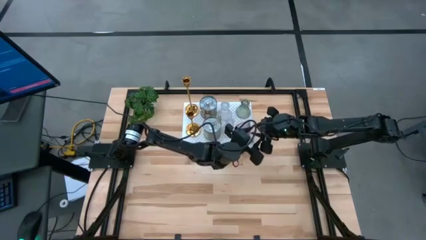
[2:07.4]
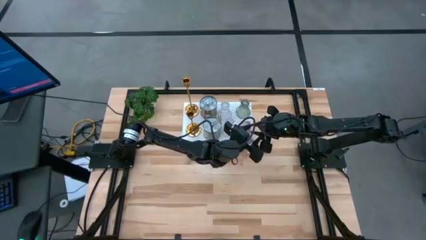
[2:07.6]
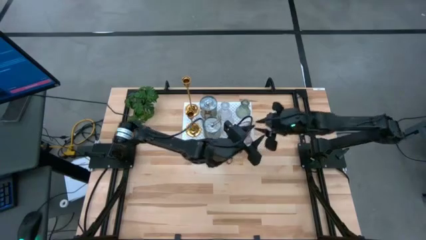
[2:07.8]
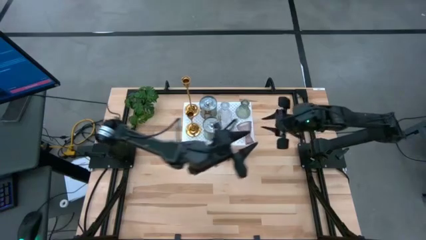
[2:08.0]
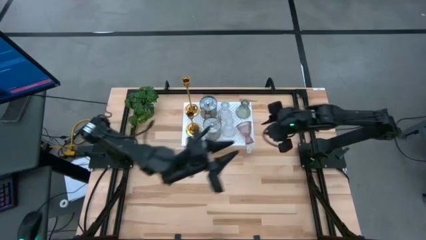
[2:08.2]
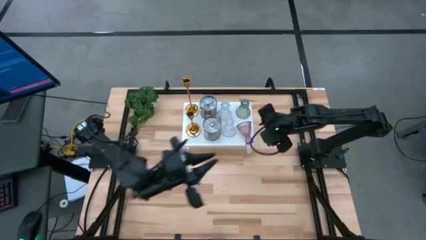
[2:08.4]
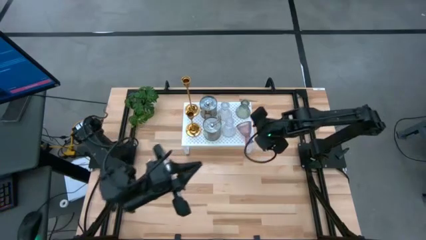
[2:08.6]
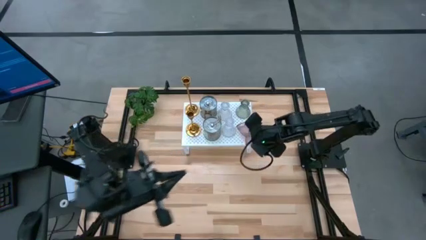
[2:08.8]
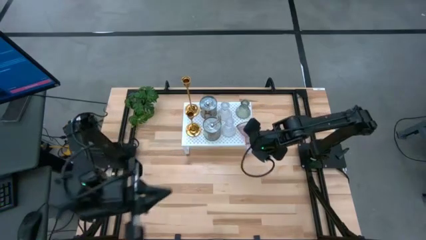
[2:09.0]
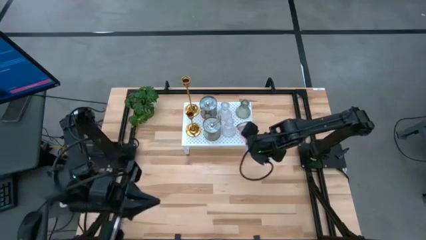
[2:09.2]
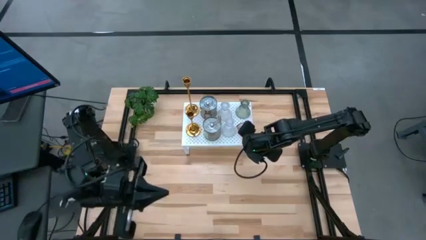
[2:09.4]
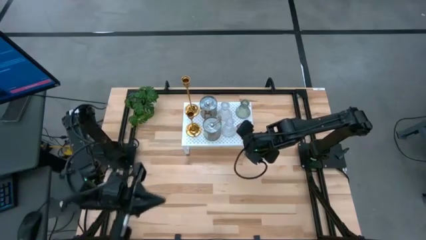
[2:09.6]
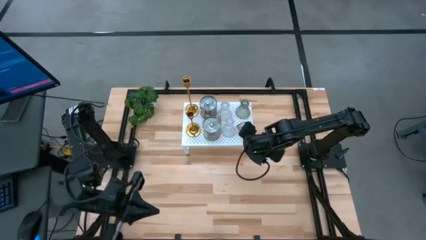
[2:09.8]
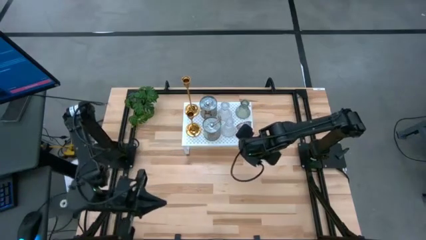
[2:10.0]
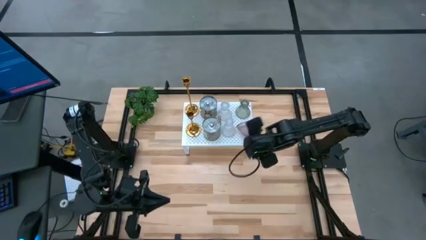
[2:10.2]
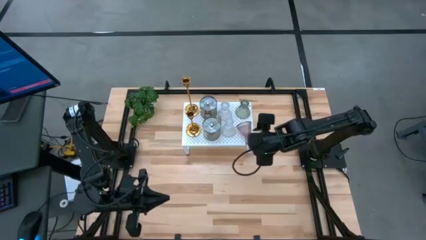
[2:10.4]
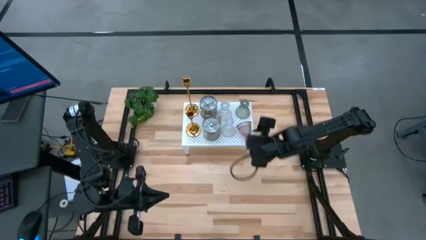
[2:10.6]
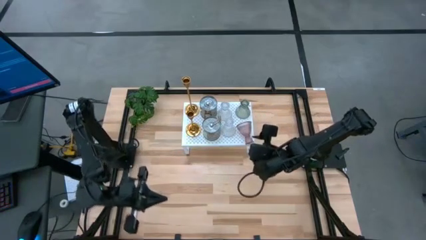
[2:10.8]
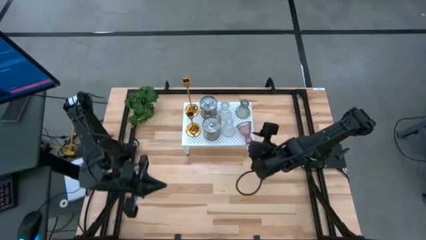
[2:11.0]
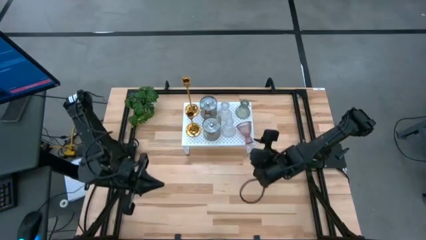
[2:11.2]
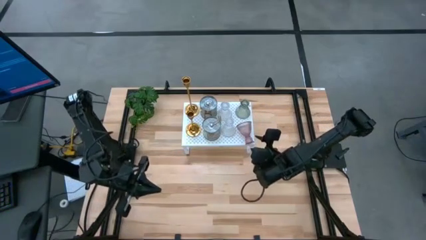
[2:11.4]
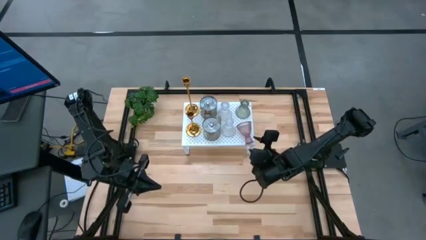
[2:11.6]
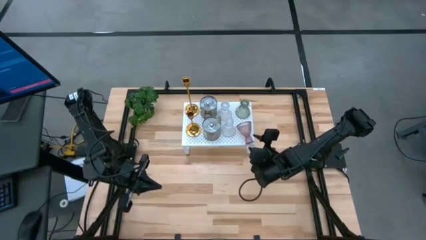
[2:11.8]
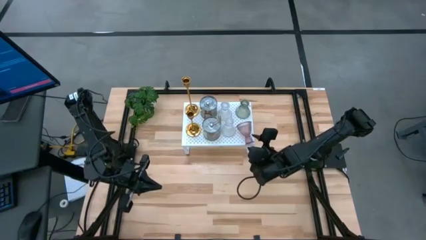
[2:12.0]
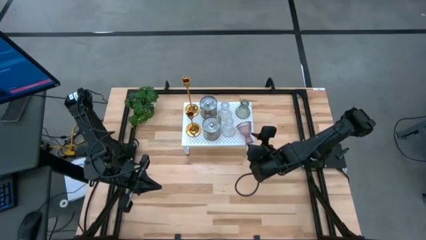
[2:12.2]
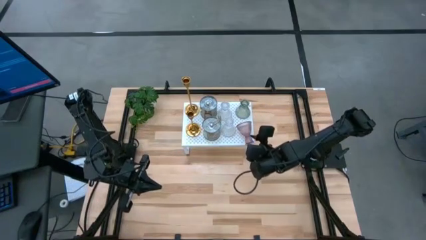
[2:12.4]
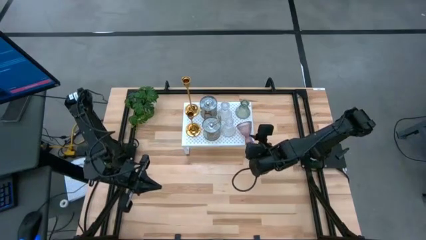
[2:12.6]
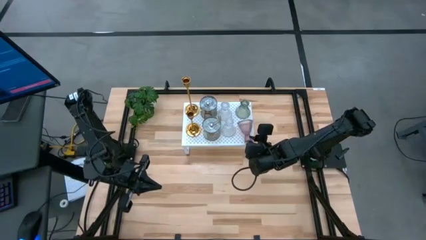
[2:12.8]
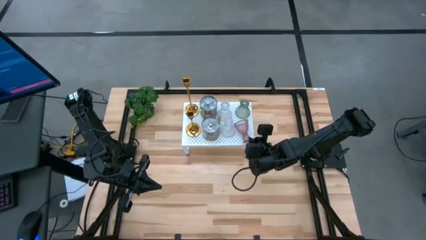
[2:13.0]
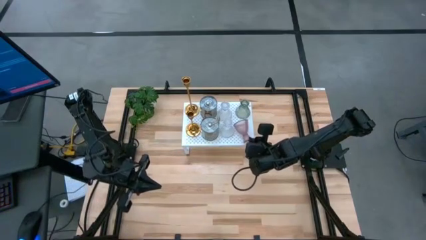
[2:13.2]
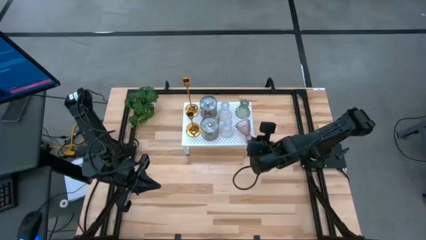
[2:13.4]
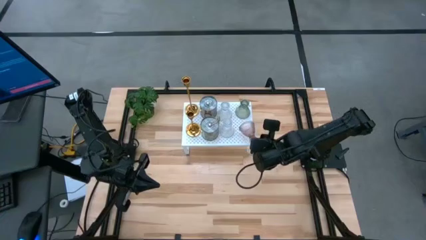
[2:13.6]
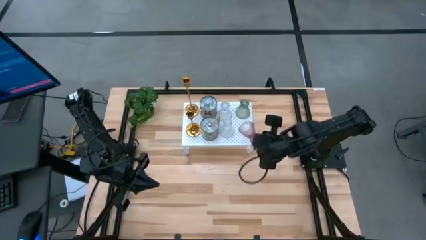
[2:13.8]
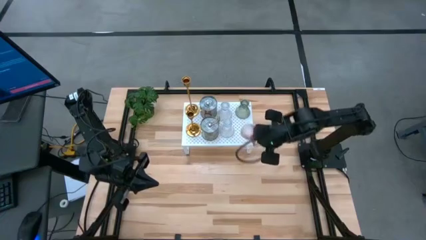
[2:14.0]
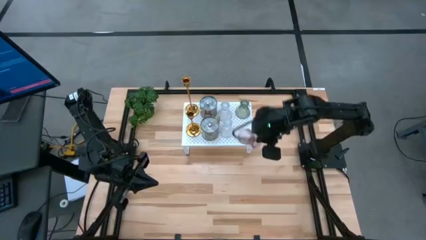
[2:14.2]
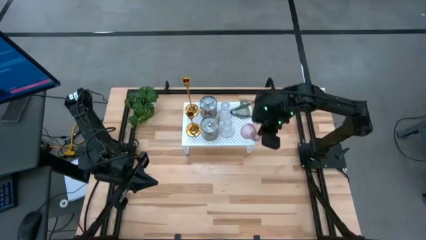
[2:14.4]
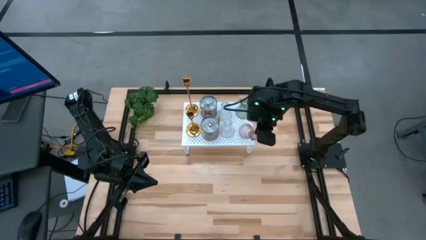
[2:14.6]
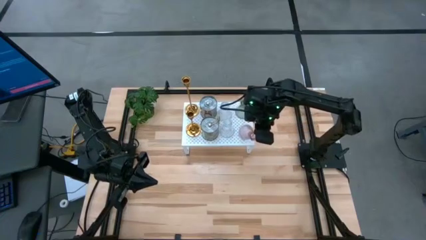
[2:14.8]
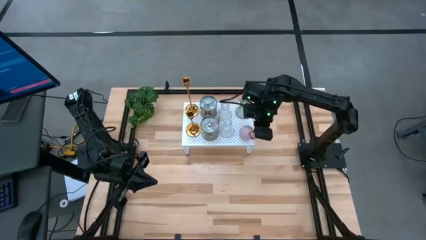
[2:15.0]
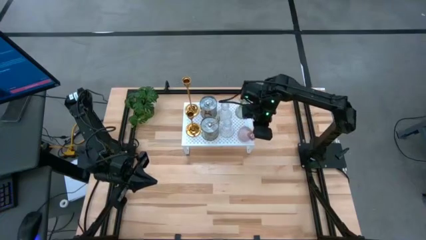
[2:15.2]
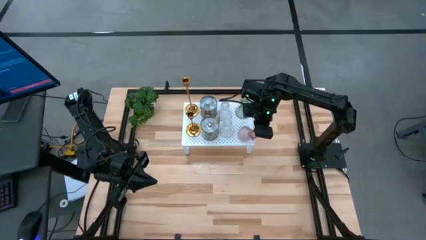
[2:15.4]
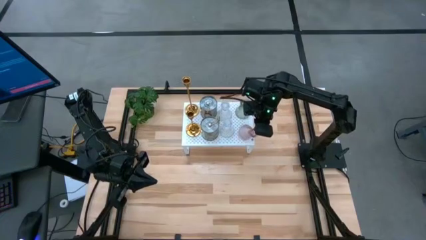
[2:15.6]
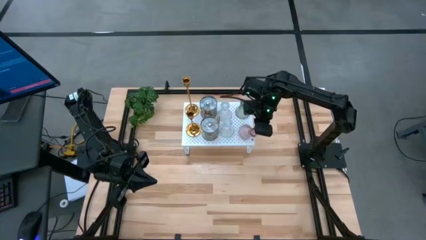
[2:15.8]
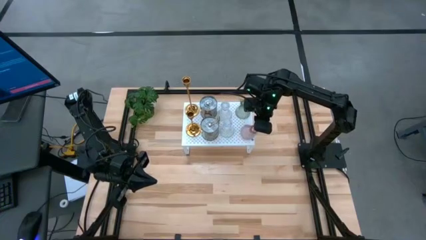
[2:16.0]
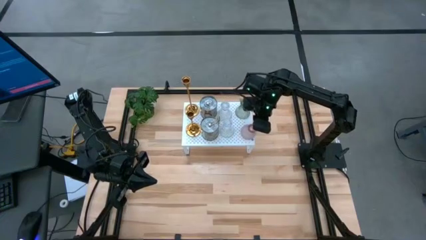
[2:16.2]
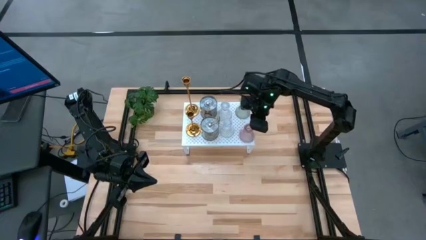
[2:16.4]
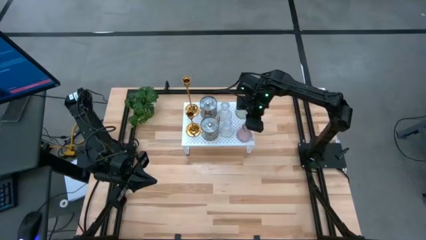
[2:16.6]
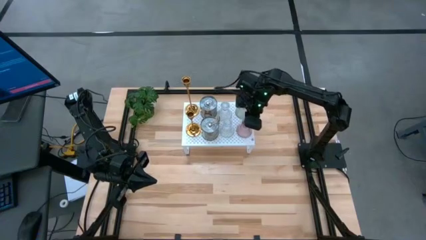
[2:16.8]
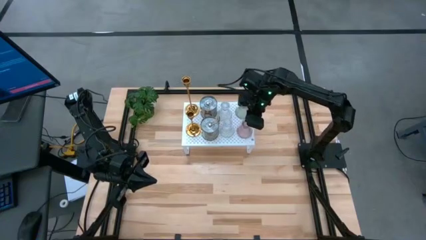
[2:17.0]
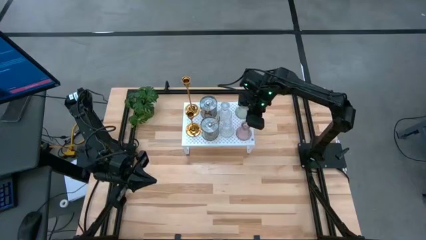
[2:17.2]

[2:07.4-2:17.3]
Task: Pick & Place candle stick holders
Put the purple glass candle holder on the shelf

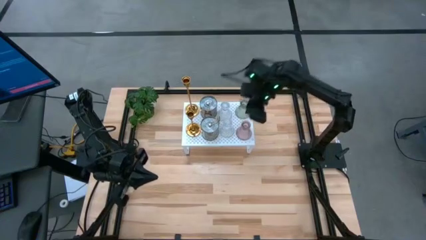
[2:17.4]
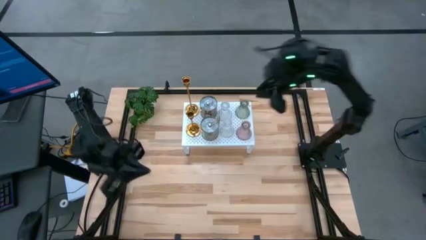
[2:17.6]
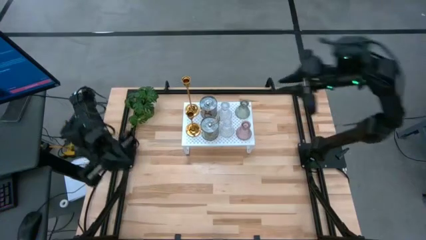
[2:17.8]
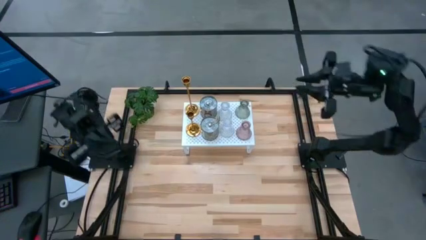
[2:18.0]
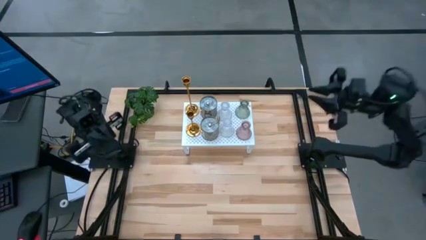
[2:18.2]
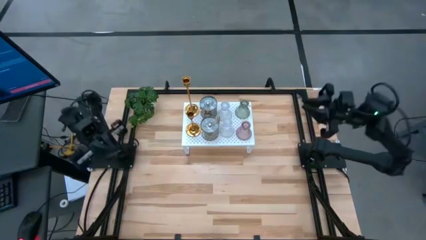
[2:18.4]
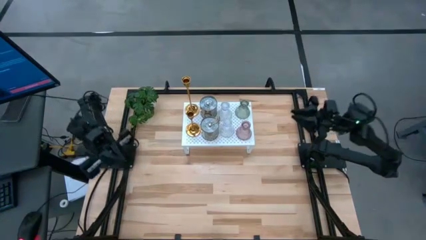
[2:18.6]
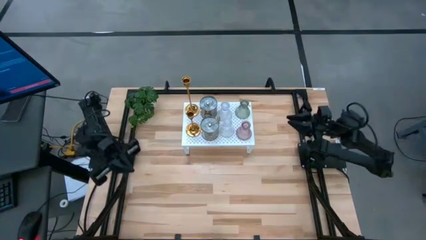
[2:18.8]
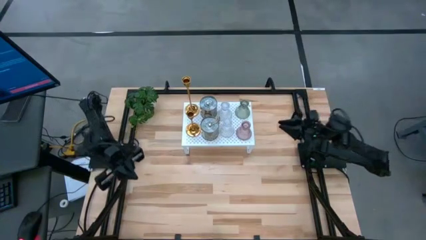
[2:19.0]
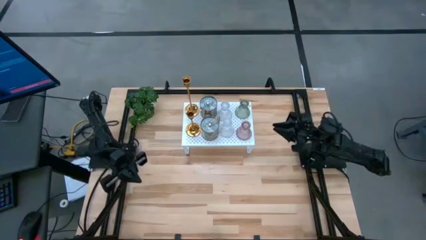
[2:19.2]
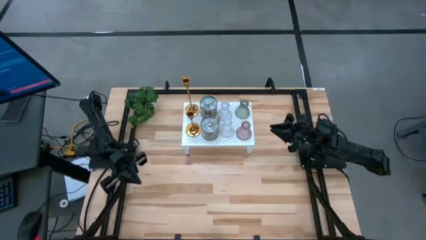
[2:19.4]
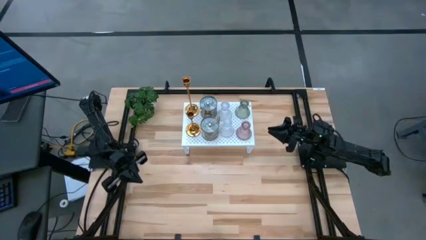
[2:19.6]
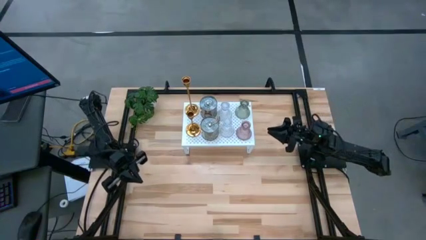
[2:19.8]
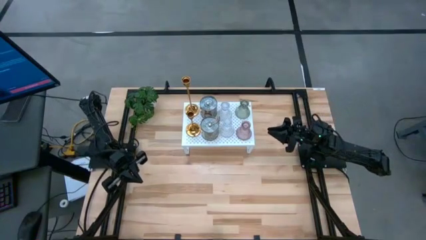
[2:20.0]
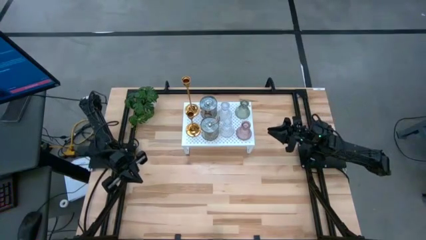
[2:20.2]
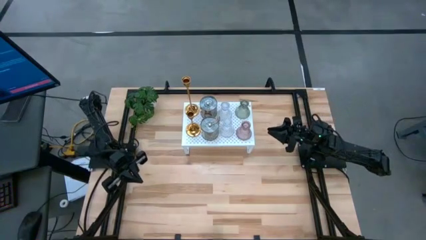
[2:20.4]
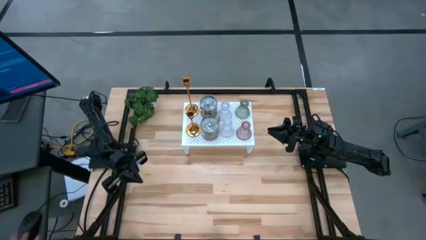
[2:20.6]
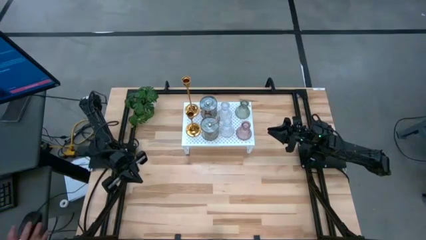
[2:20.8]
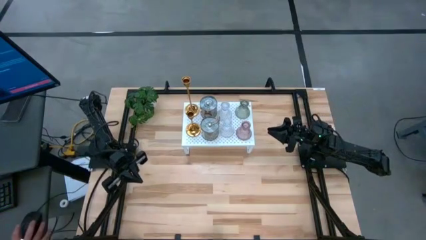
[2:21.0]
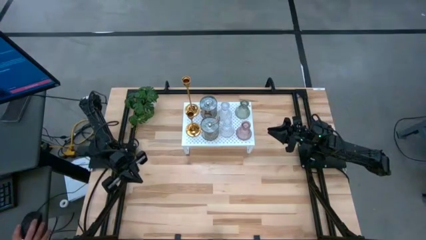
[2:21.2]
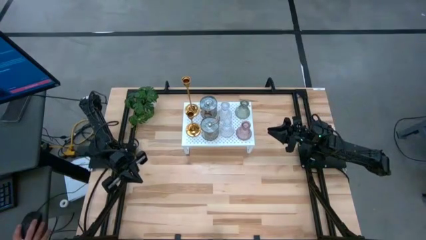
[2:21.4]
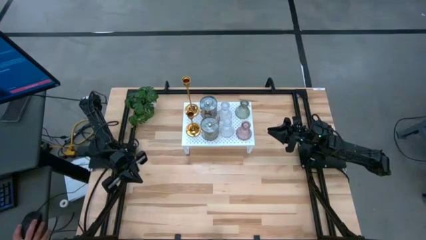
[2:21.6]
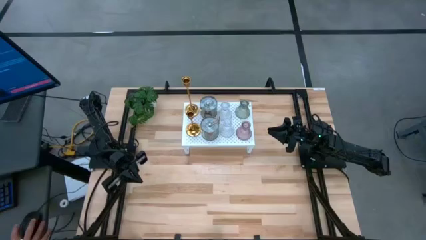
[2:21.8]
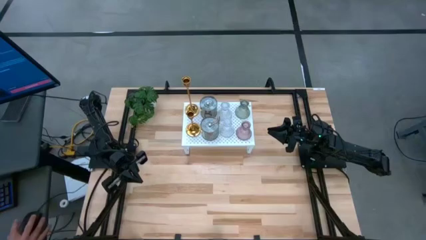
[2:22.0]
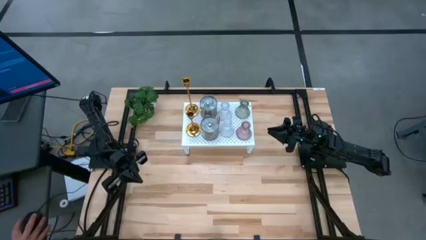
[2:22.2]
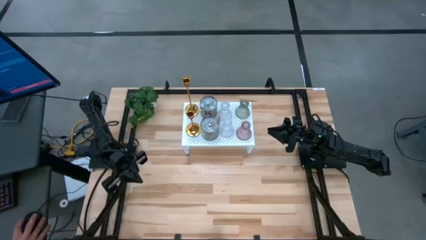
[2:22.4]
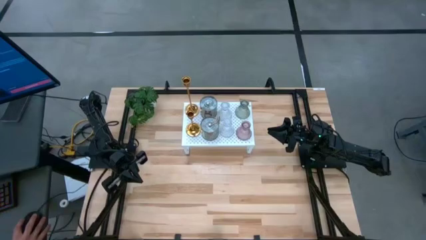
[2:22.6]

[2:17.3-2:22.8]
Return to Home Position

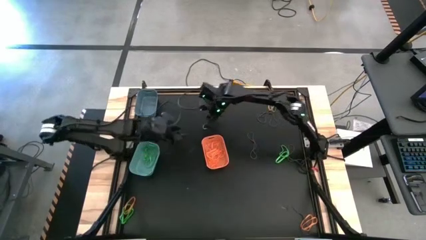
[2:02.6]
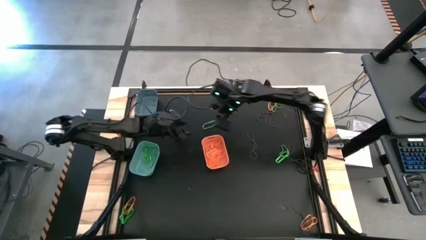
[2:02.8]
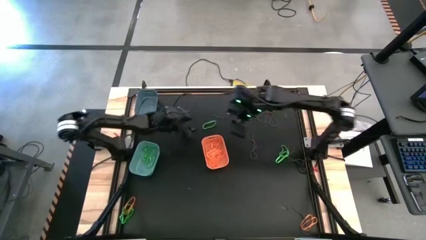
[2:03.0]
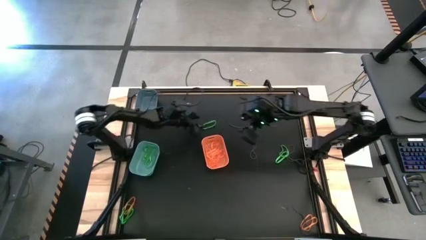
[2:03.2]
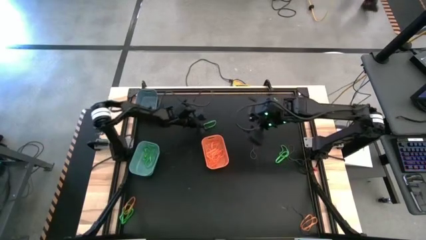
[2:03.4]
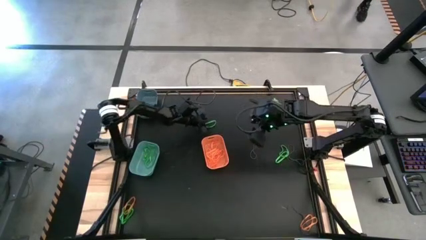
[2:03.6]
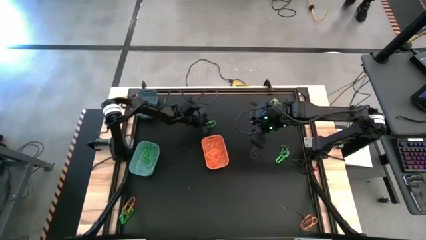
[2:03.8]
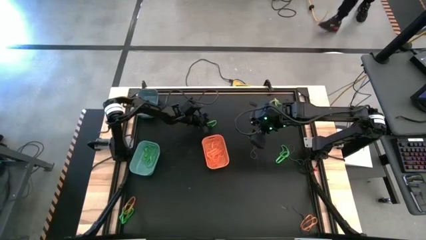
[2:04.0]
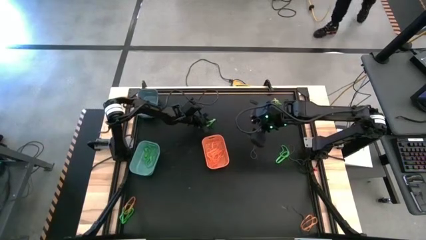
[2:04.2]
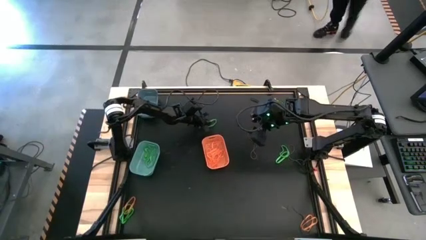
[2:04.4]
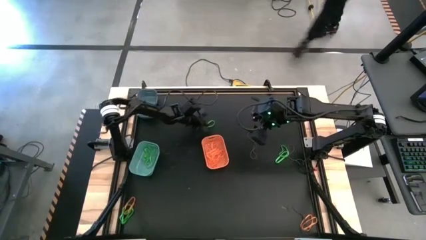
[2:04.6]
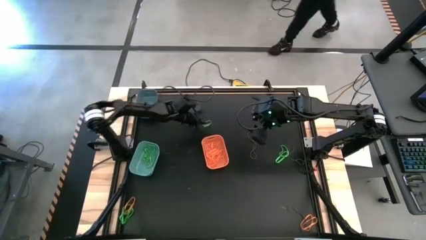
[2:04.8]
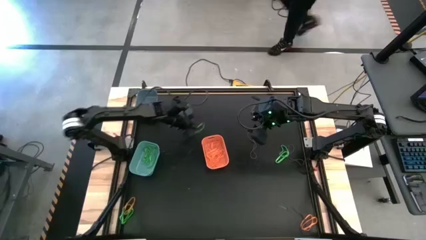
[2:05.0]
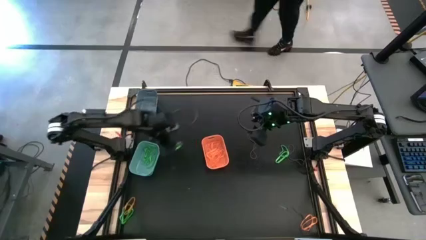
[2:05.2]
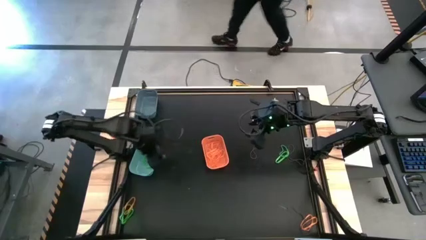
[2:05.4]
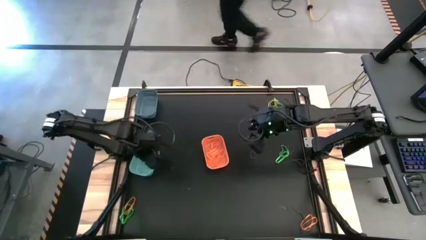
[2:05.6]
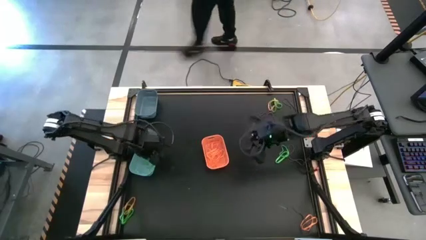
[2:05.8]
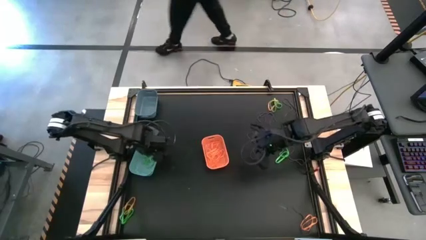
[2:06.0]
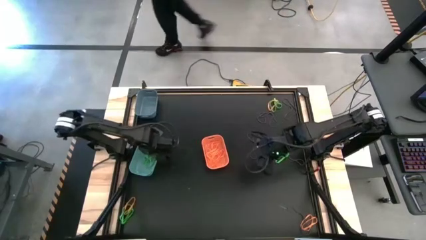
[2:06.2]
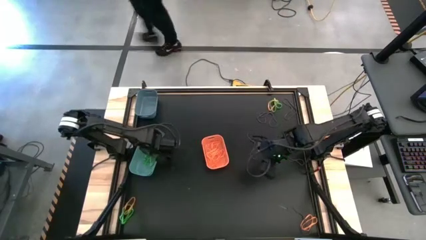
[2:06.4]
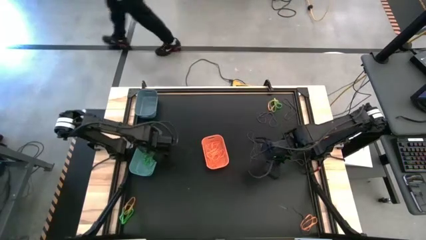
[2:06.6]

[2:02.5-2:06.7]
Task: Sort rubber bands into baskets
Put the green rubber band into the light sea green bin
